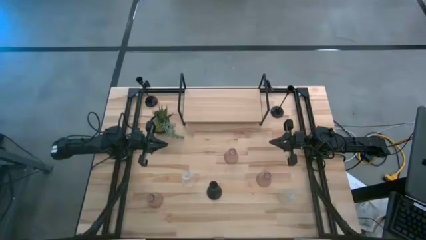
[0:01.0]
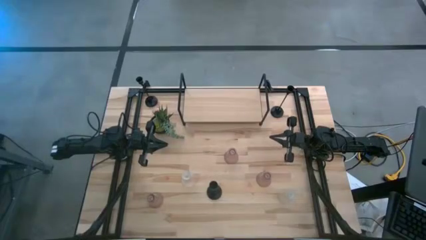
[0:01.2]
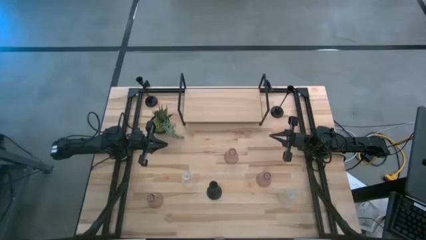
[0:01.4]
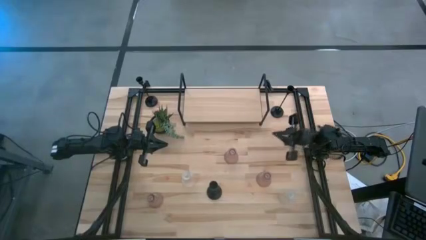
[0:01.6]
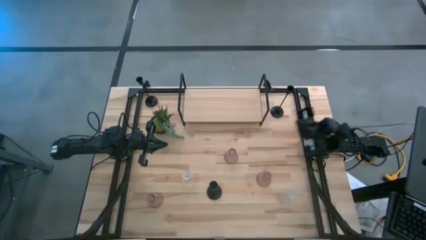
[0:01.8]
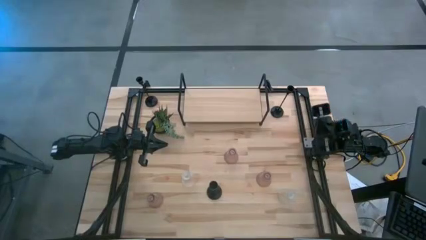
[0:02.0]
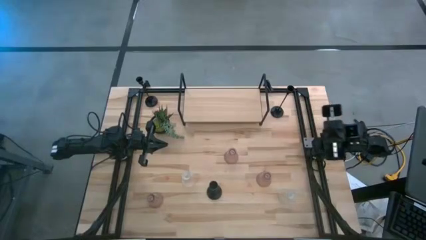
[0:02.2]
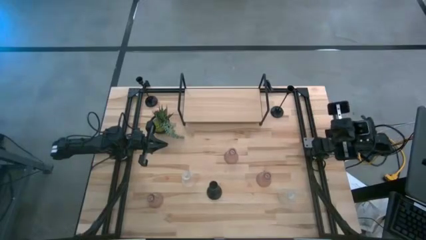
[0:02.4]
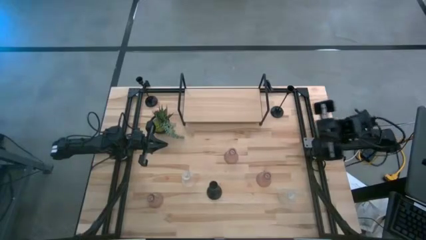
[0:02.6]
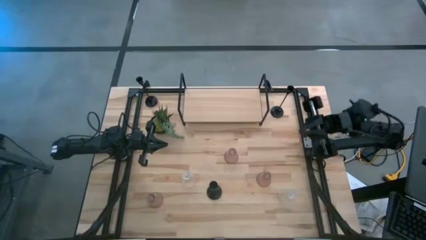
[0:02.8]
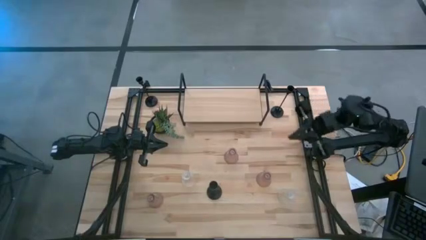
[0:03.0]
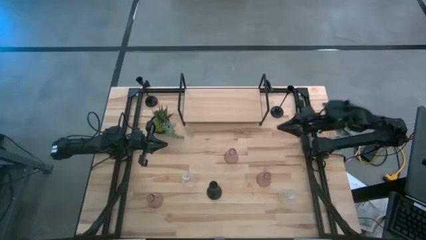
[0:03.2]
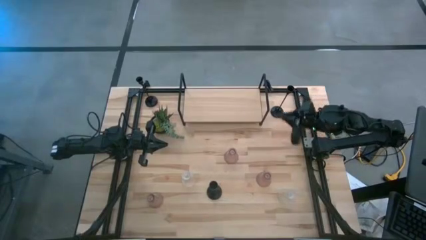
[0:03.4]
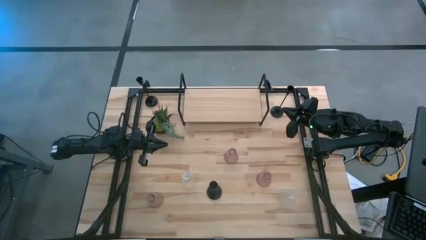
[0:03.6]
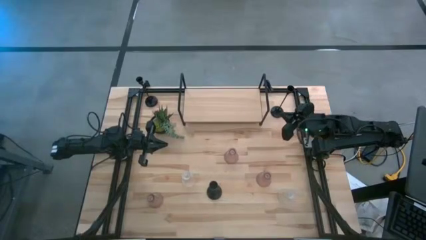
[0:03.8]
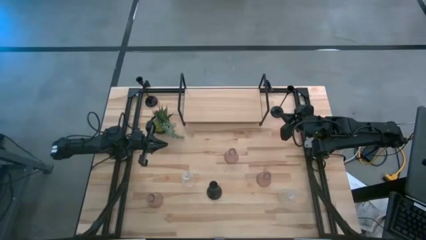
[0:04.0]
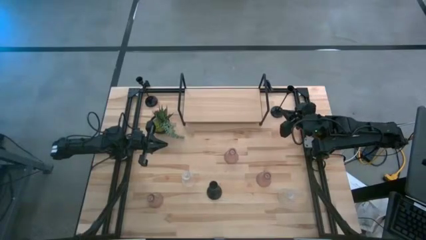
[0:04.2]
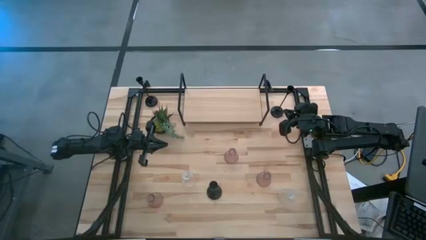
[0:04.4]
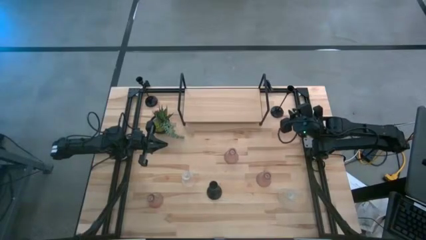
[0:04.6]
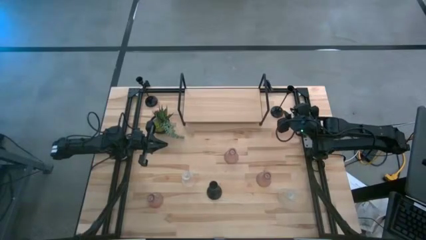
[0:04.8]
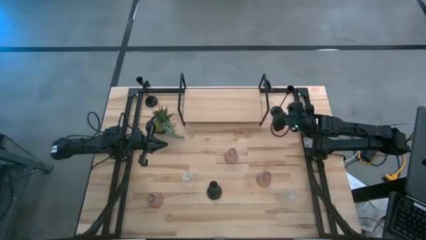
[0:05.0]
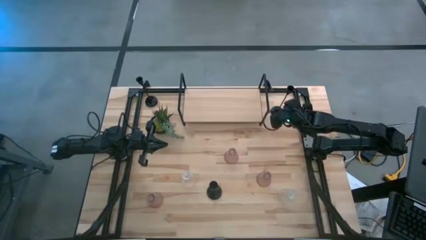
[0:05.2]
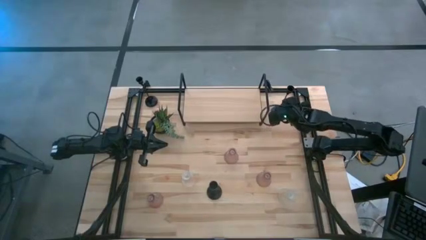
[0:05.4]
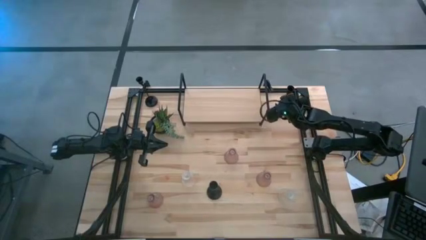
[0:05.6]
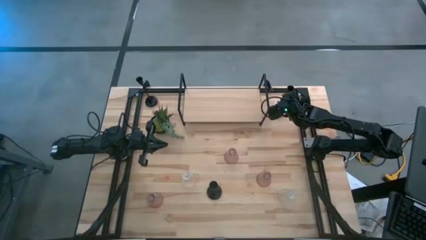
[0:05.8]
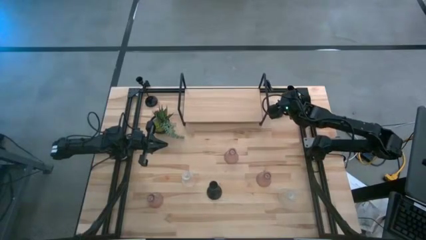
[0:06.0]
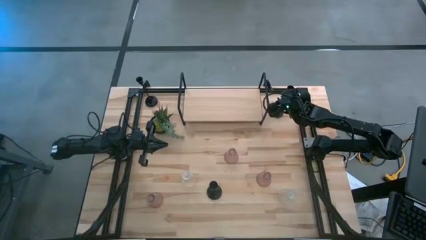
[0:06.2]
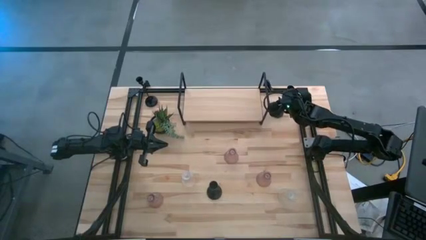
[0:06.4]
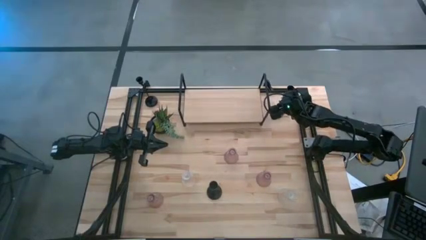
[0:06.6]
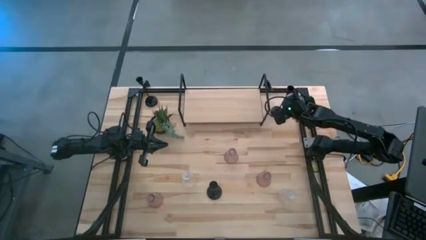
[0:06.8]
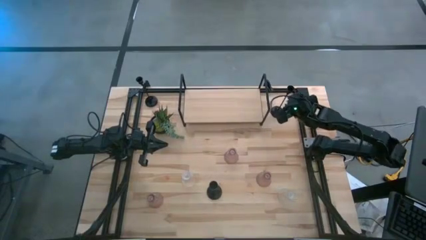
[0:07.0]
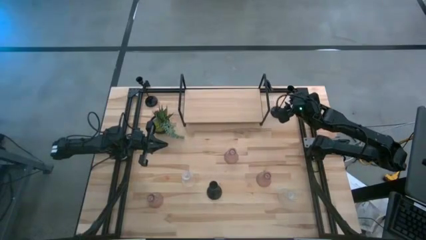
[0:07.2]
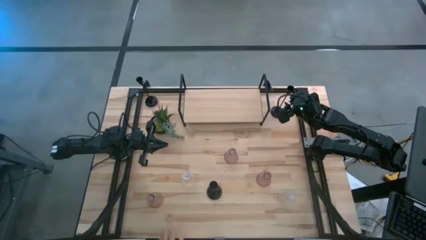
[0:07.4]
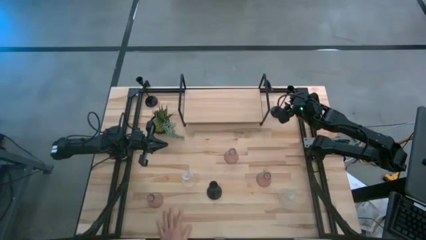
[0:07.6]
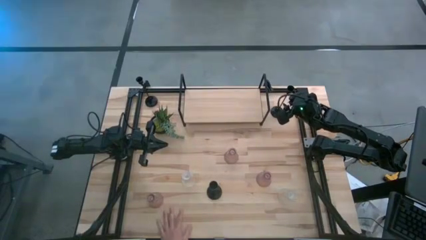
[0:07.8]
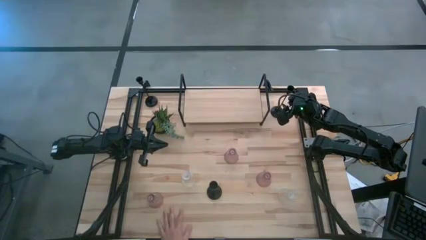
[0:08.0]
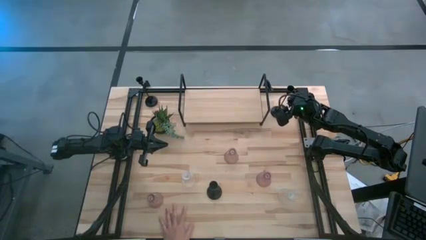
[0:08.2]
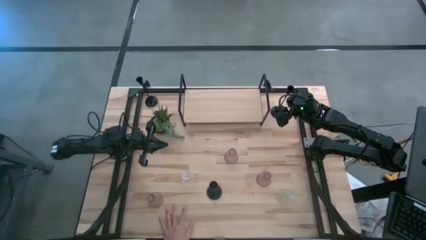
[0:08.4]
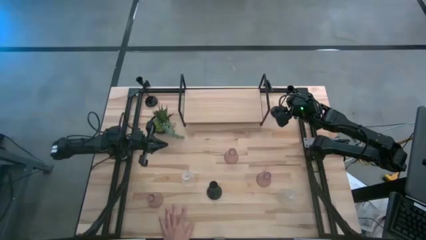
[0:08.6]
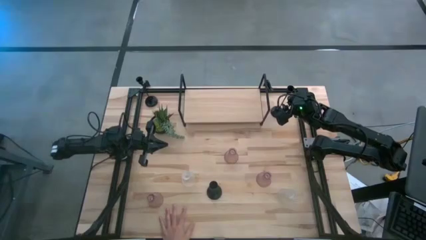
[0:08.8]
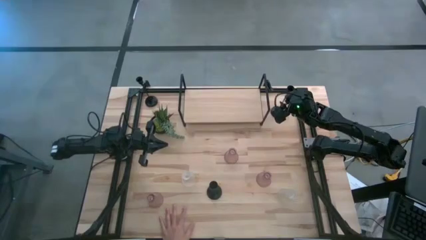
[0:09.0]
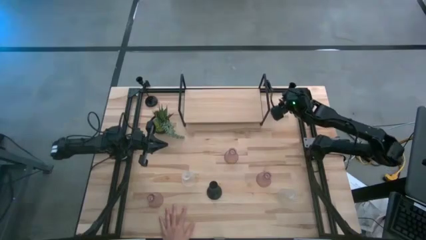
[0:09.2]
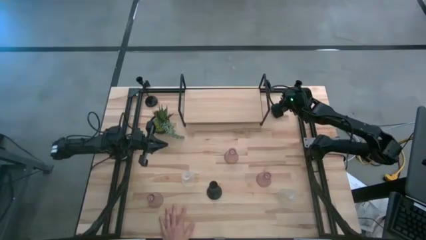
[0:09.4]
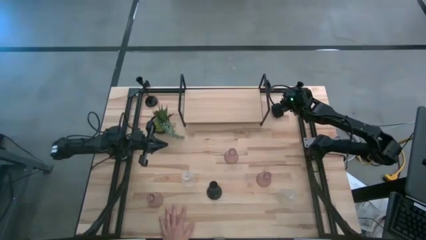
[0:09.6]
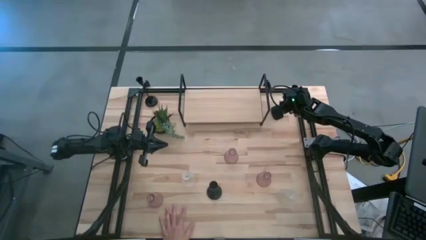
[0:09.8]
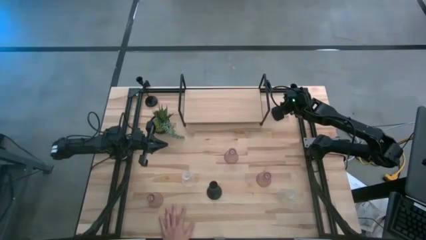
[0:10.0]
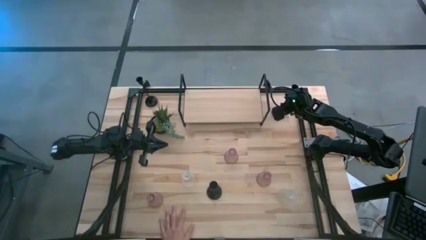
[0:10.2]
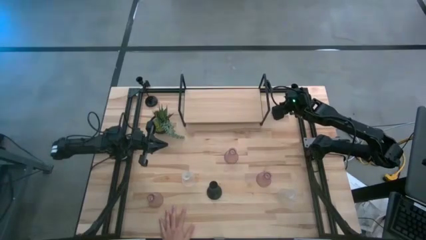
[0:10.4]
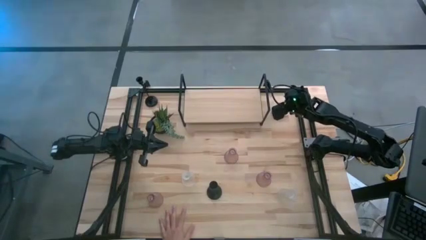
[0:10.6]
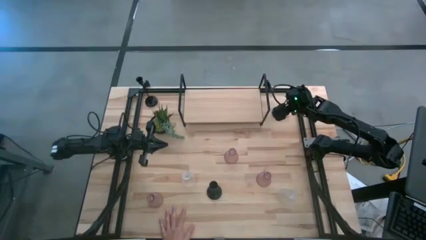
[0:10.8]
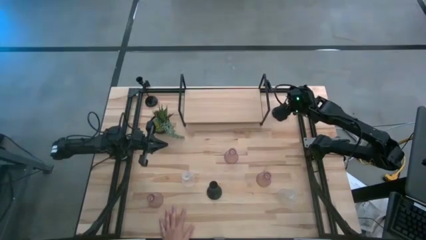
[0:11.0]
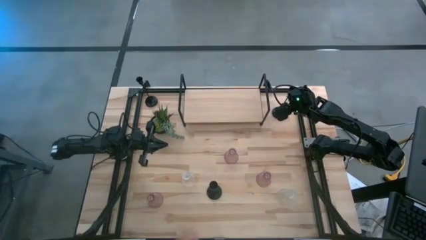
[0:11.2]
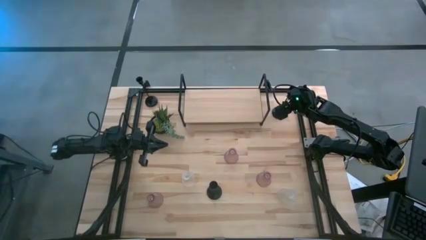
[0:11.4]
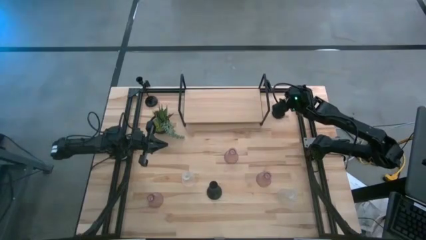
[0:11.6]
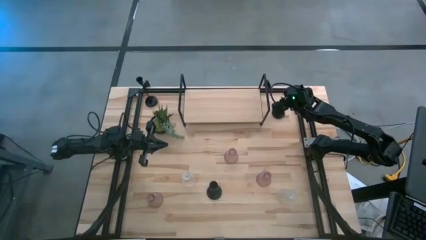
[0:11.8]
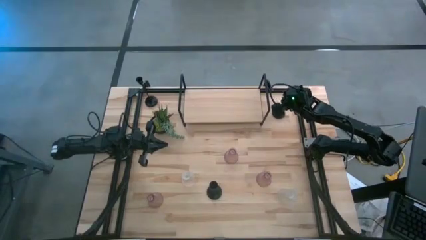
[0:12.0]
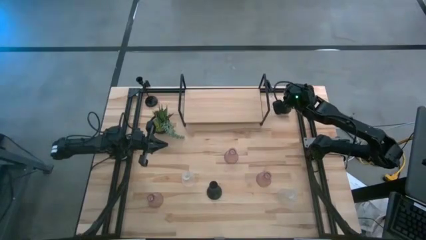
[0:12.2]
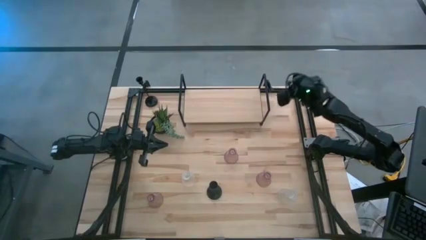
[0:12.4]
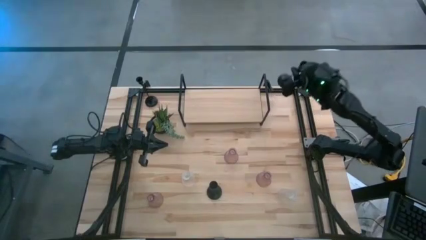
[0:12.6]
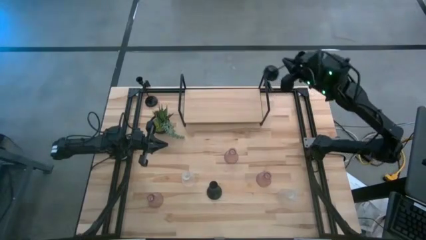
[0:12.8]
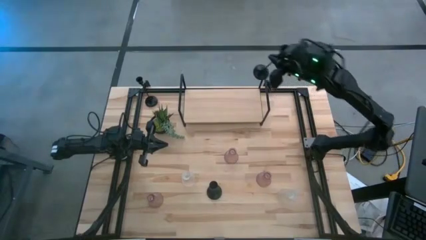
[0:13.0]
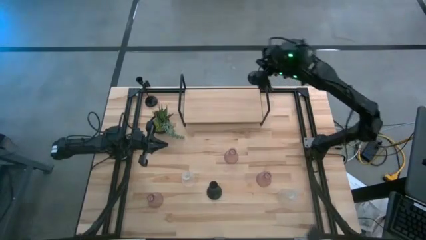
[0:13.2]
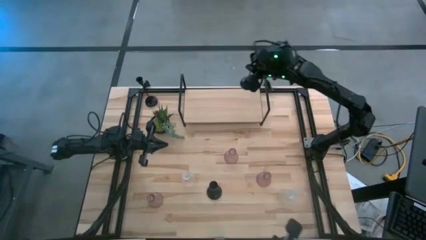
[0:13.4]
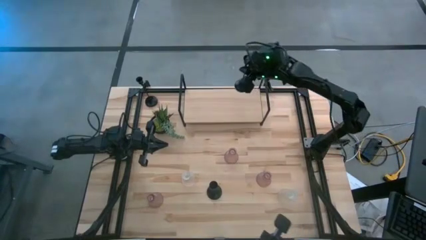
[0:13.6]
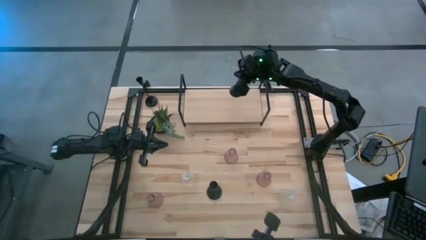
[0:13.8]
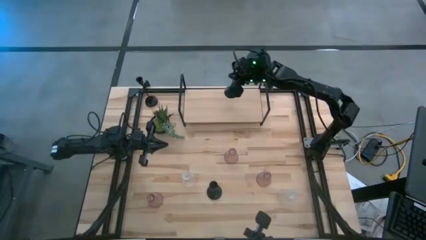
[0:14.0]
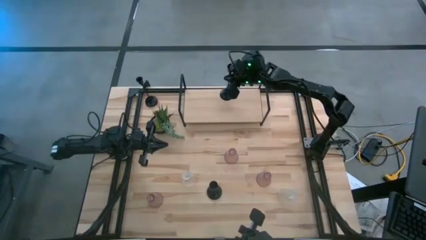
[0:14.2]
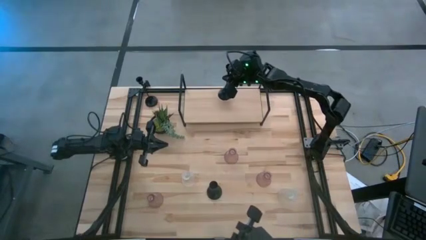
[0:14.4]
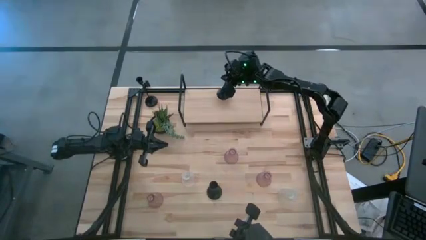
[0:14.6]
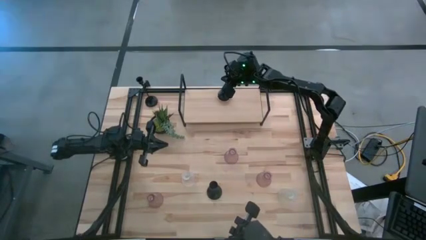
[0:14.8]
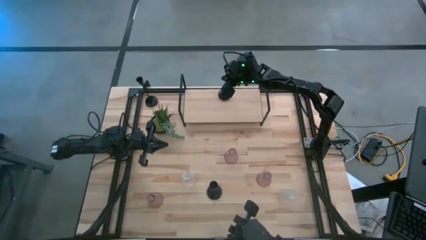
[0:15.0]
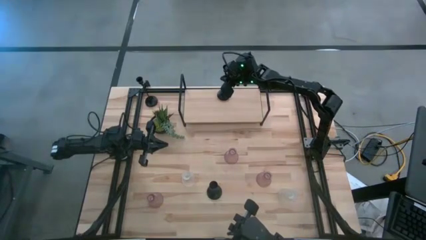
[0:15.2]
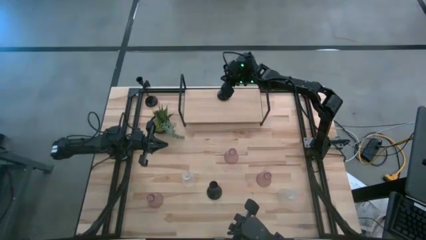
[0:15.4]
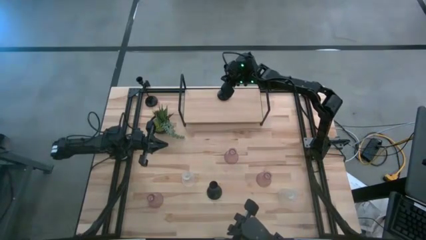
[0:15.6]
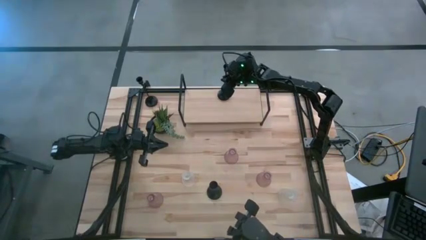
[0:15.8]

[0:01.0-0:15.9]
Task: Pick & Place candle stick holders
Put the top right black candle holder on the shelf
